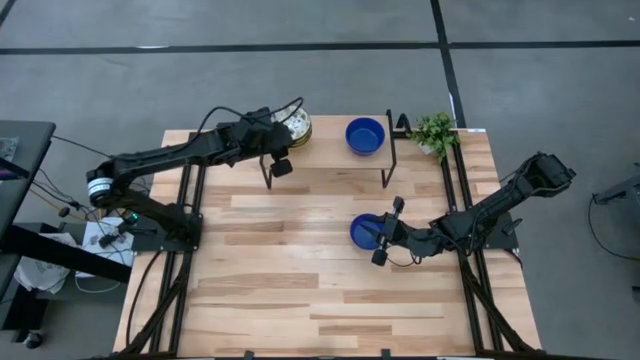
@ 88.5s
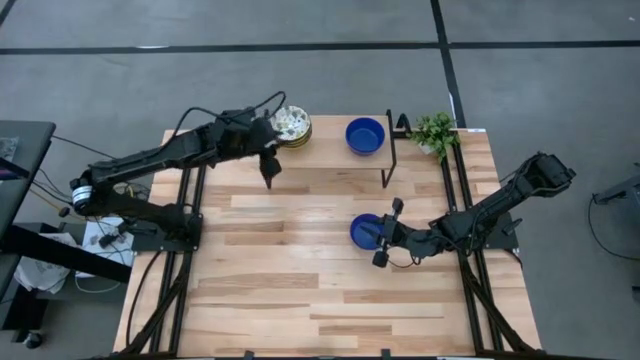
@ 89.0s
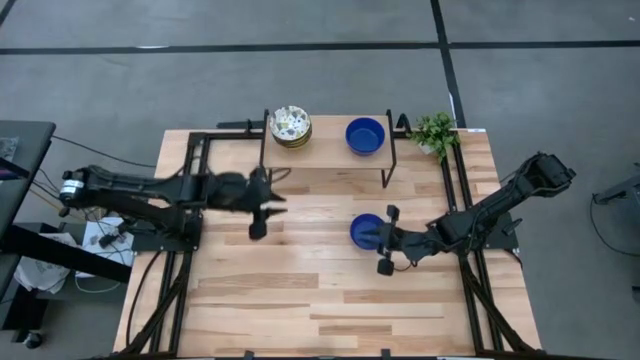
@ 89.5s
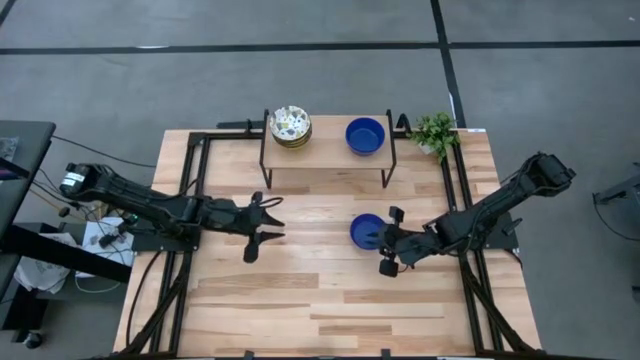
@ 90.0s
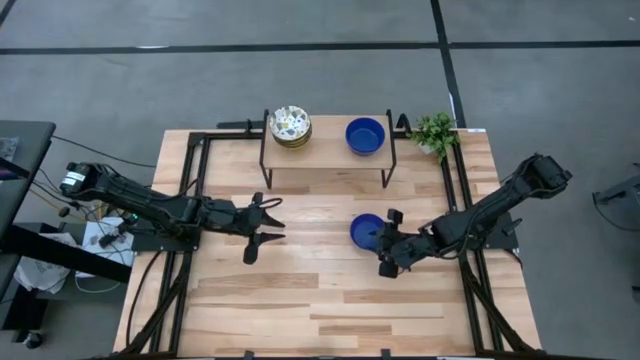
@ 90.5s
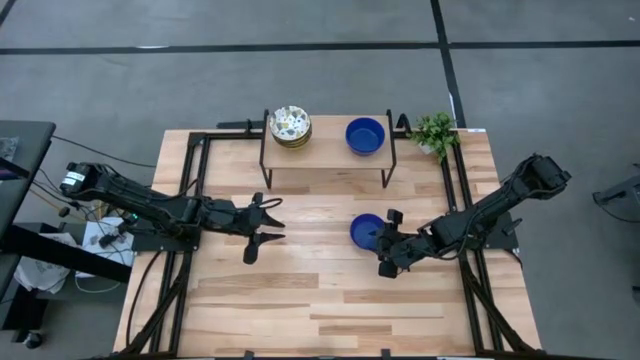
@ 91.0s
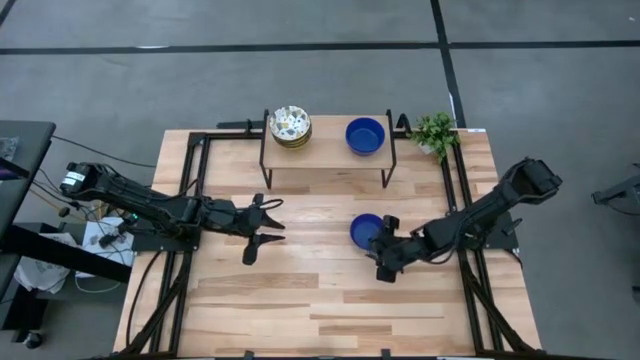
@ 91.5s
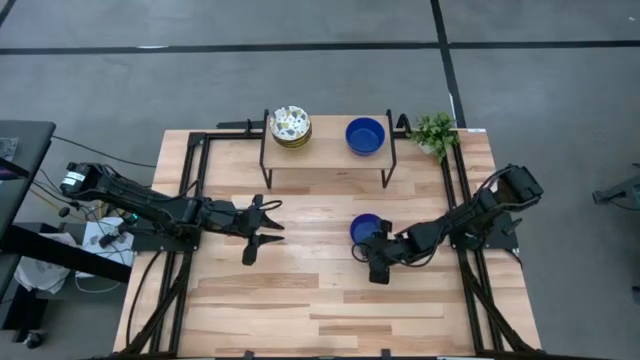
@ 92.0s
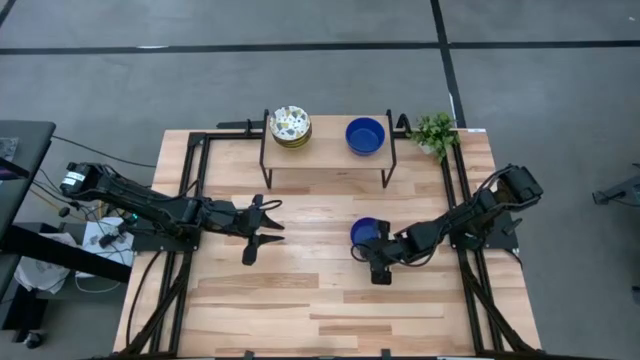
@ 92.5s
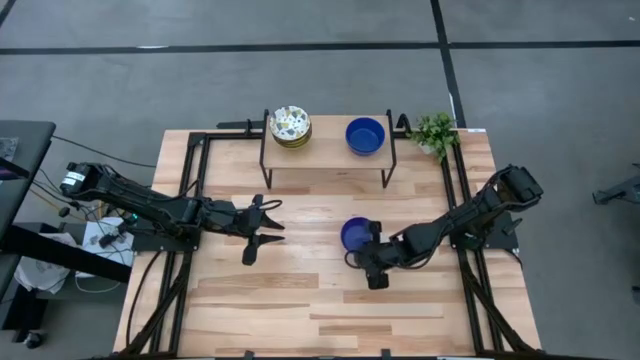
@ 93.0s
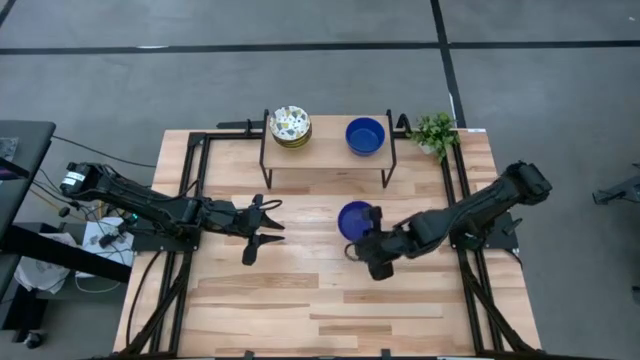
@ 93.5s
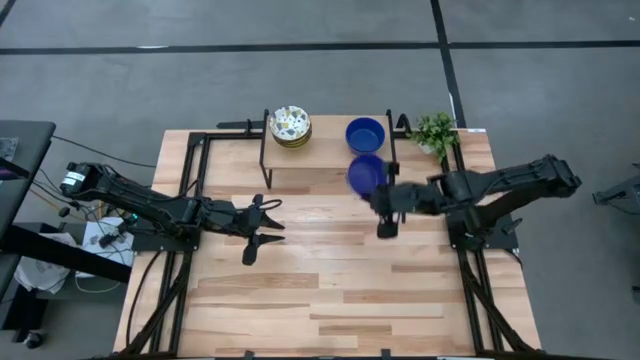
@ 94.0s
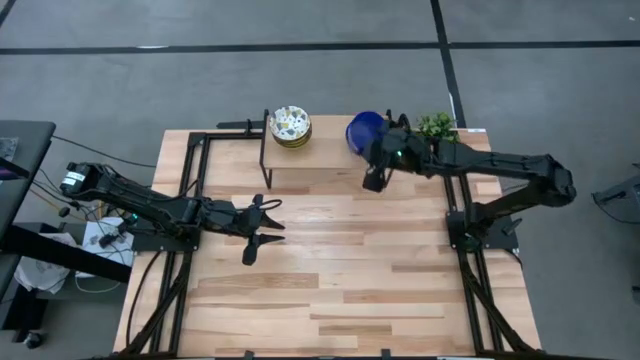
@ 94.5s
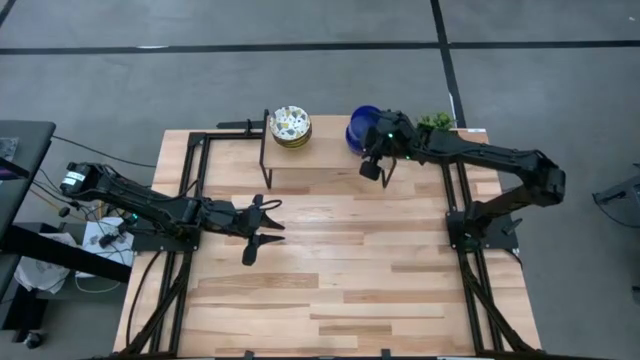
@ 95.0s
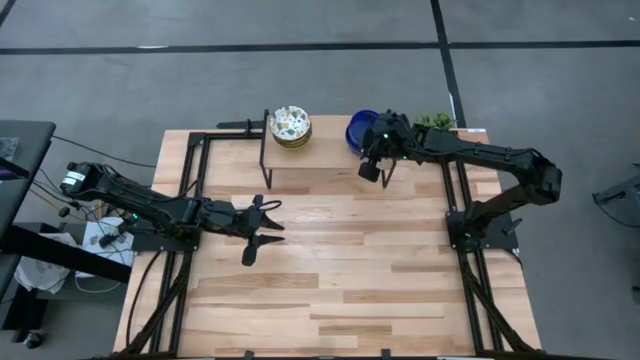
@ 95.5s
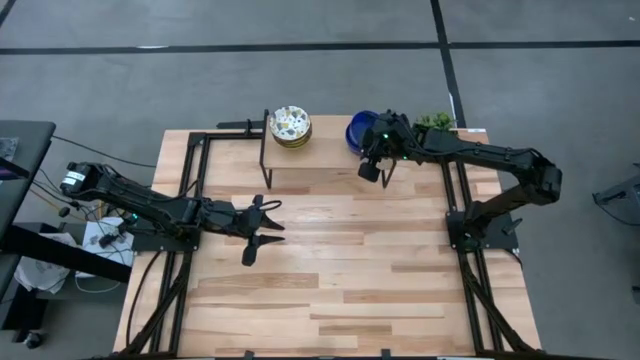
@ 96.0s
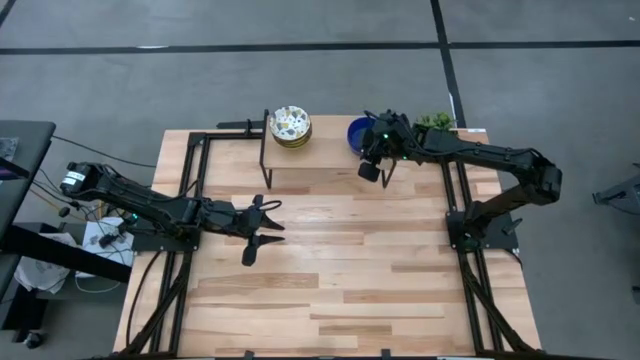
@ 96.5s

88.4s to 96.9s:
Task: Pick & Place Mini bowls
Stack the blue bowl on top of the blue bowl on the shelf

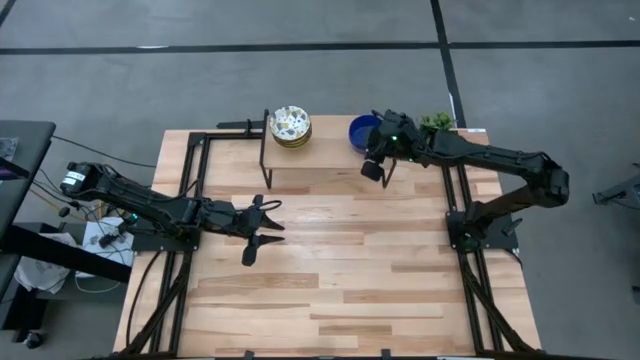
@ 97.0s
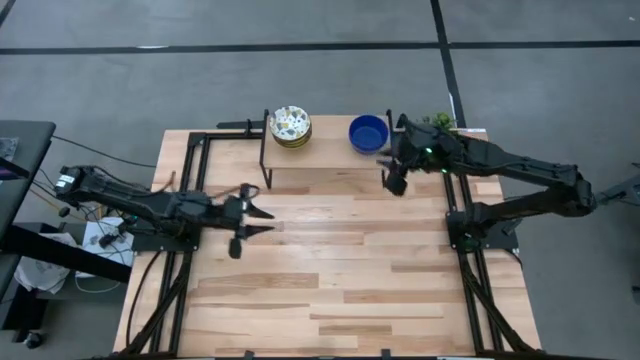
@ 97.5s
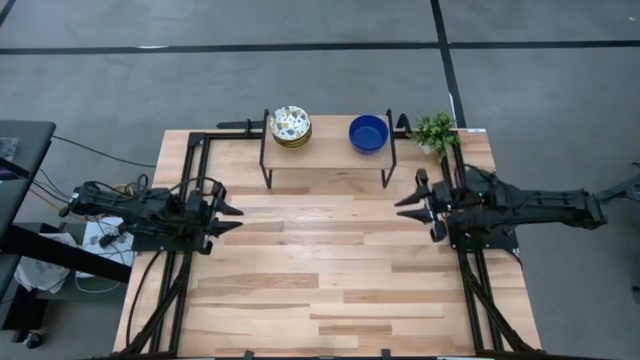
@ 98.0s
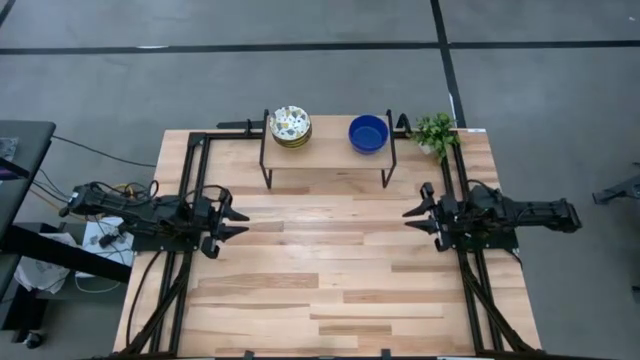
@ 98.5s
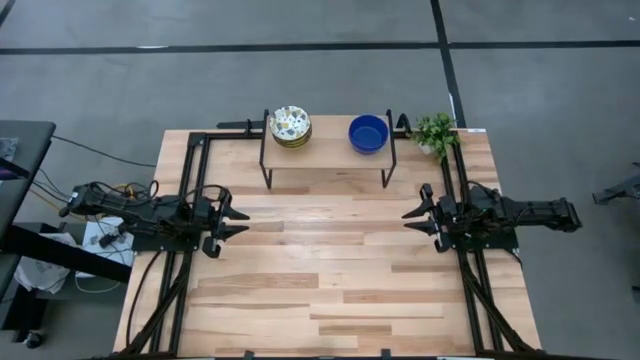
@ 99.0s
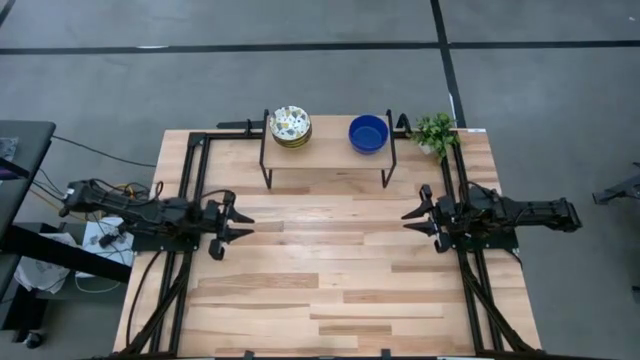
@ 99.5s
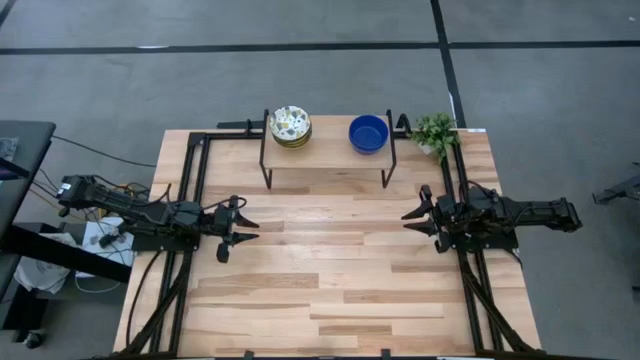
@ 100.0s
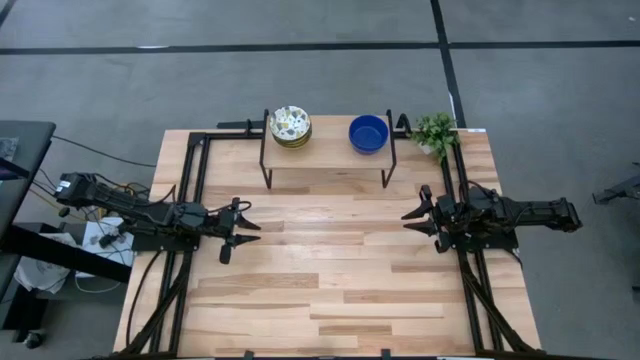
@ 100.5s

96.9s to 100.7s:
Return to Home Position

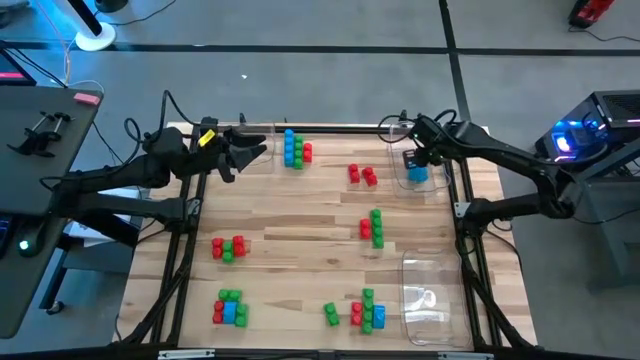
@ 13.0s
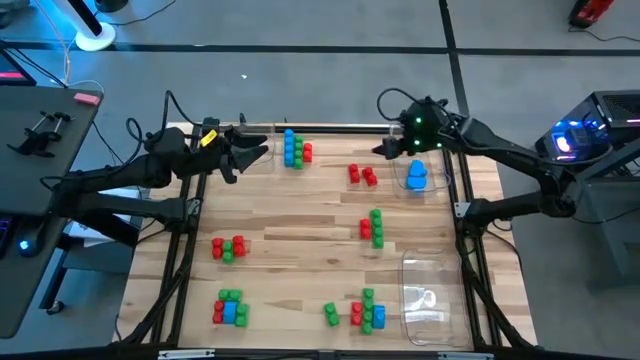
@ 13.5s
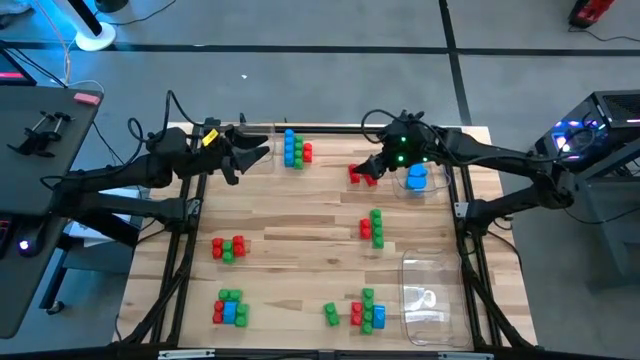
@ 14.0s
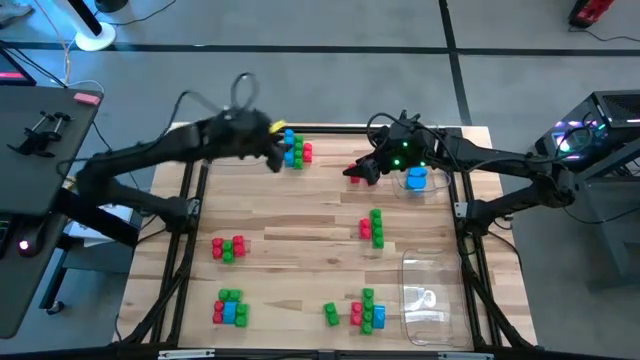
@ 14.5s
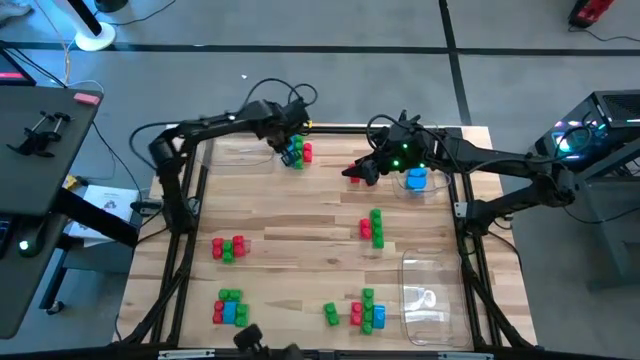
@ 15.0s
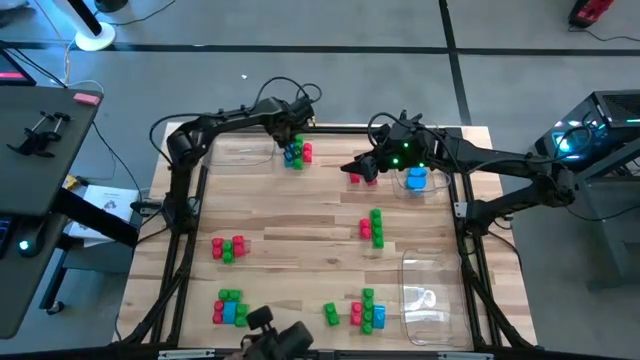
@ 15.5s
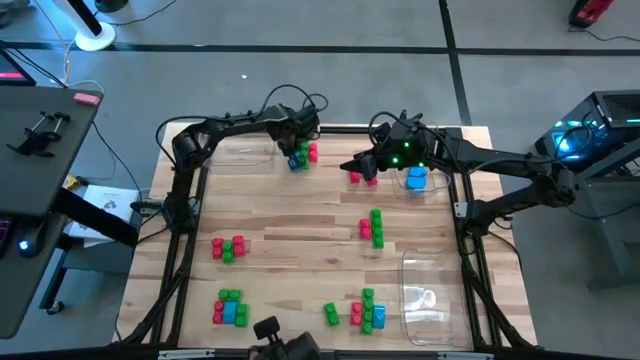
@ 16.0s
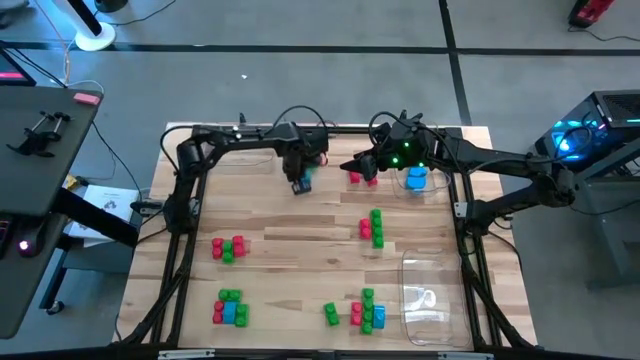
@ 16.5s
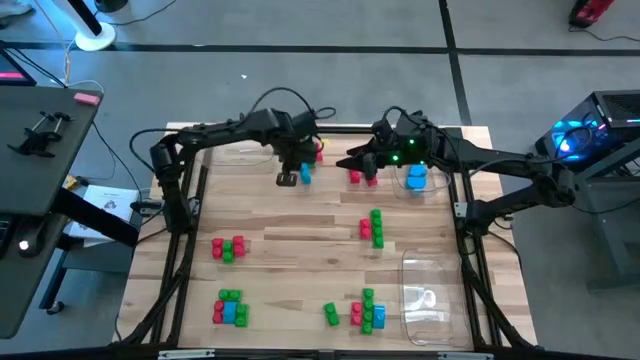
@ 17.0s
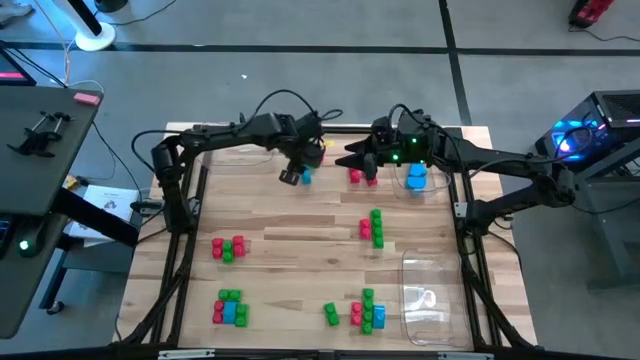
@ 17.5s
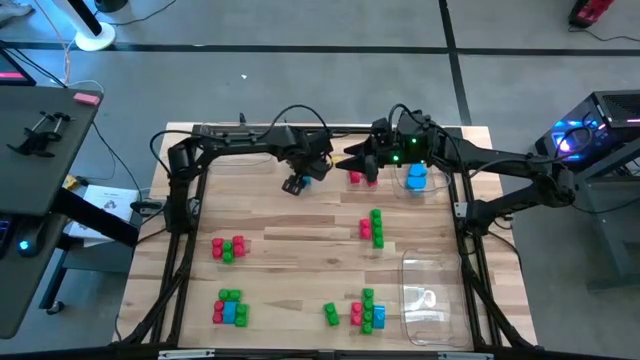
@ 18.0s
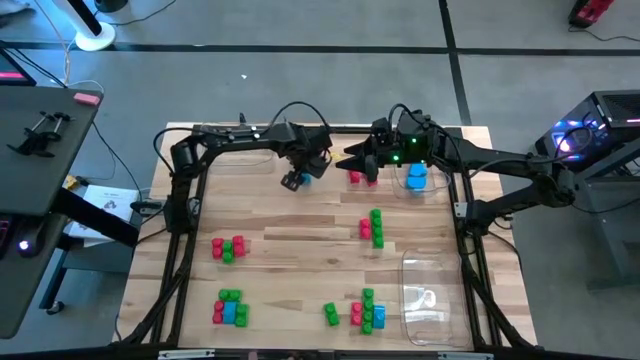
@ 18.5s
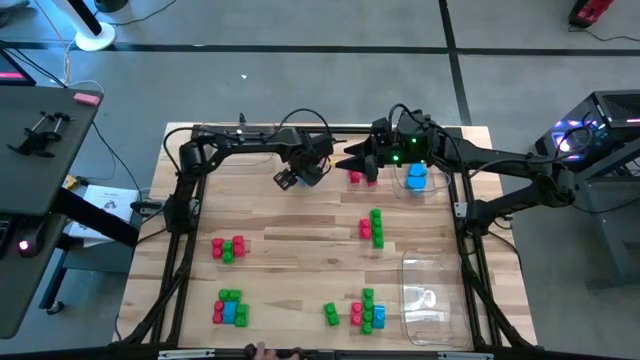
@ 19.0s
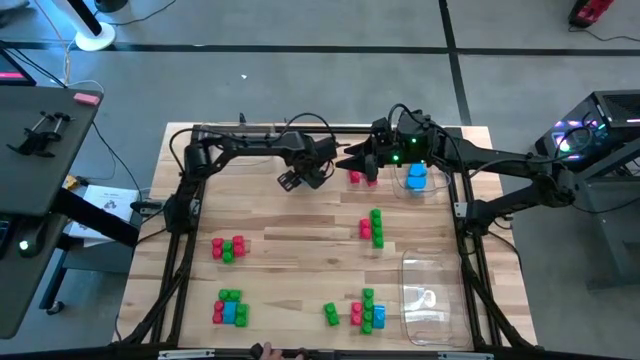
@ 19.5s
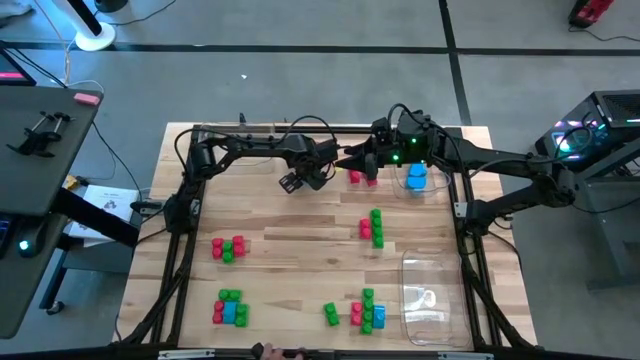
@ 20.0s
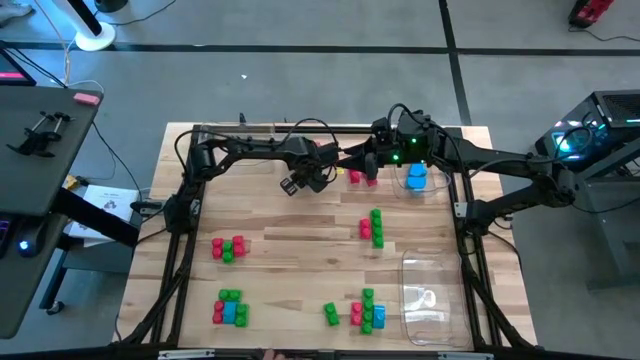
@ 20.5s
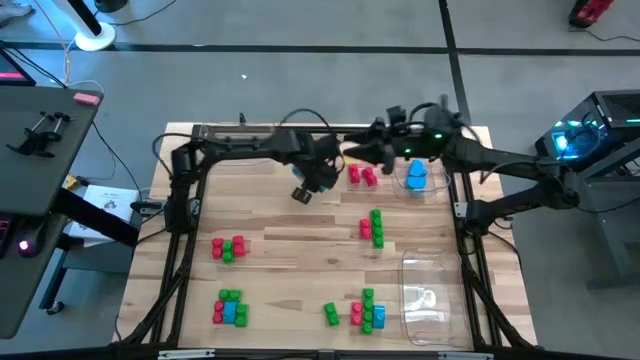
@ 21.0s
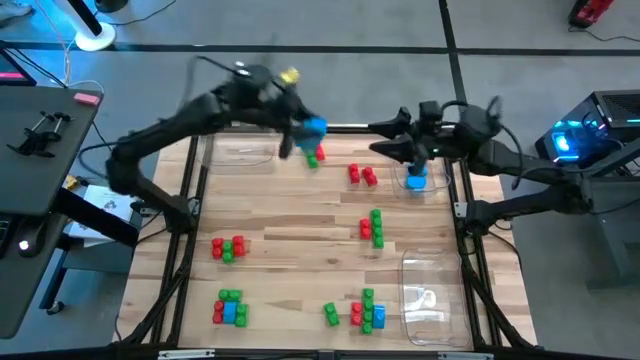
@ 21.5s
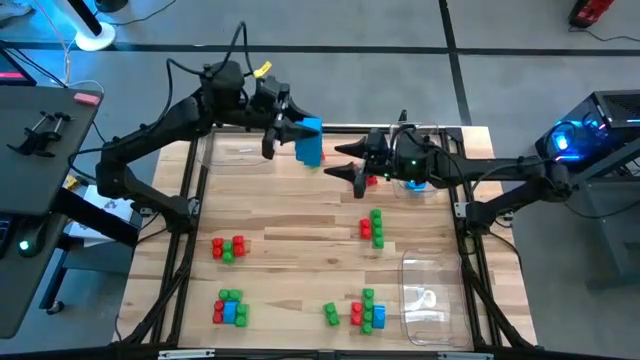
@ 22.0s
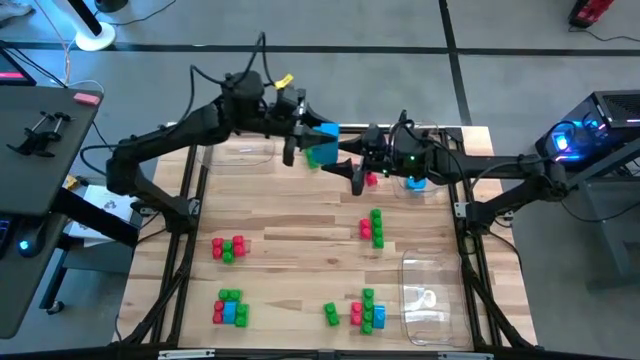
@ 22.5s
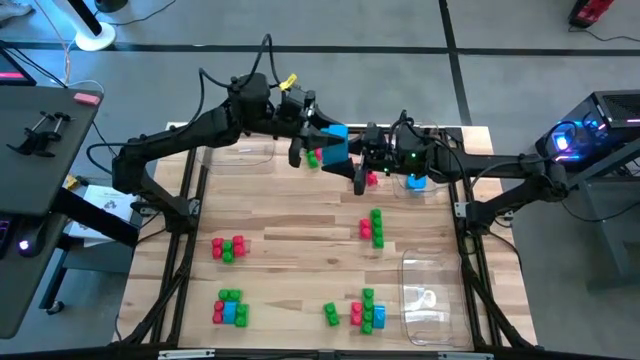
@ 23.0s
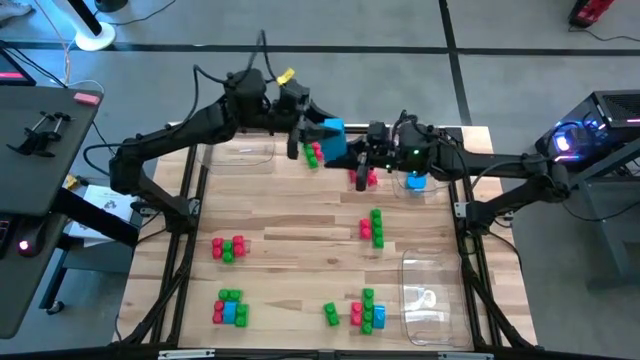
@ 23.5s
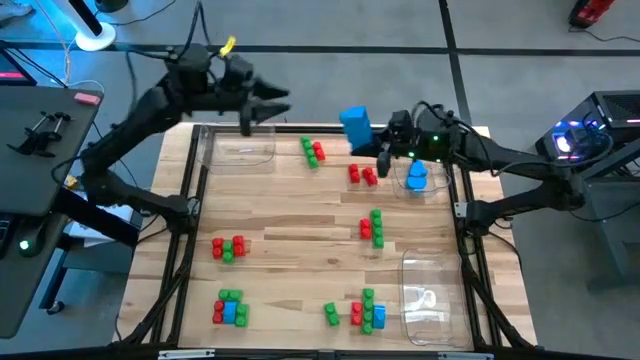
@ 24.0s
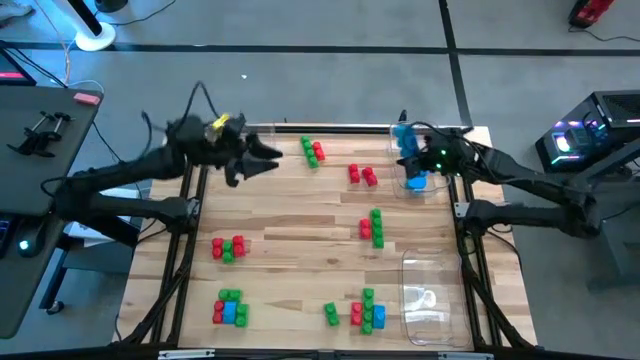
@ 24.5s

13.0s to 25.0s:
Task: Sort blocks
Put the blue game piece into the top right transparent bin
